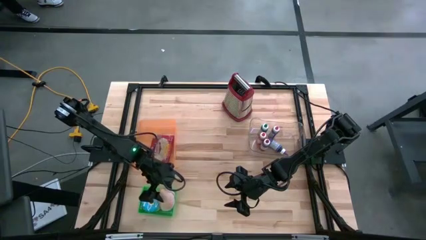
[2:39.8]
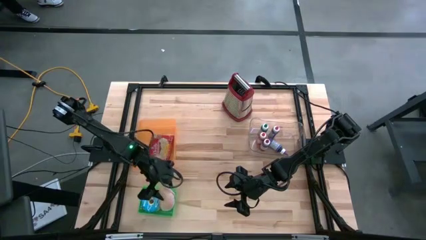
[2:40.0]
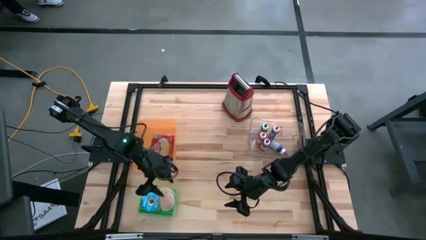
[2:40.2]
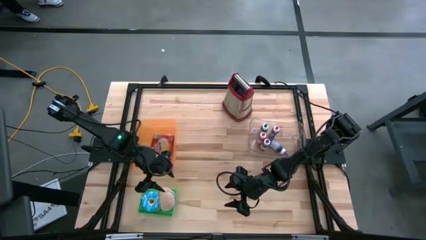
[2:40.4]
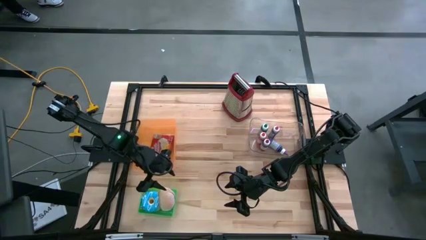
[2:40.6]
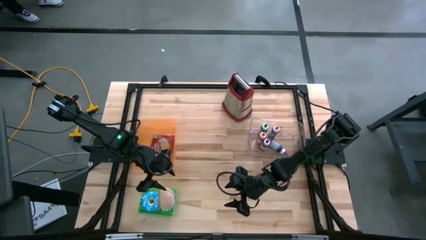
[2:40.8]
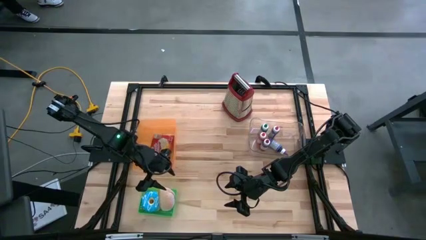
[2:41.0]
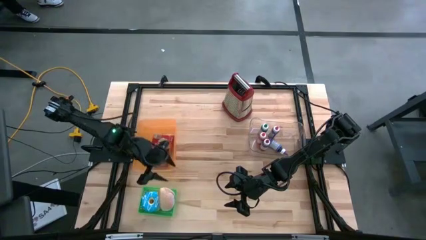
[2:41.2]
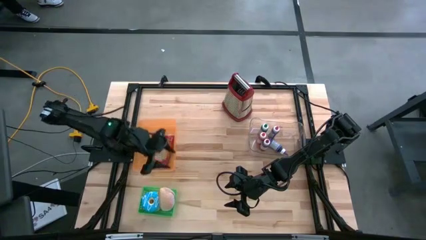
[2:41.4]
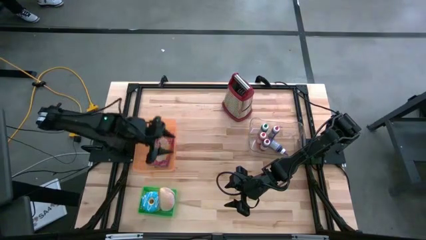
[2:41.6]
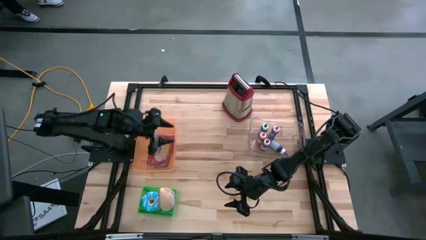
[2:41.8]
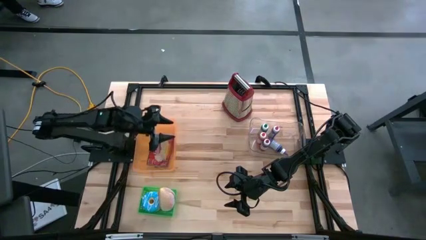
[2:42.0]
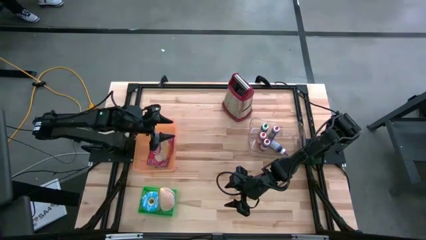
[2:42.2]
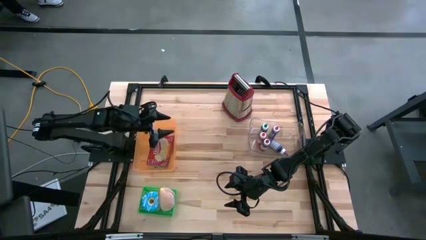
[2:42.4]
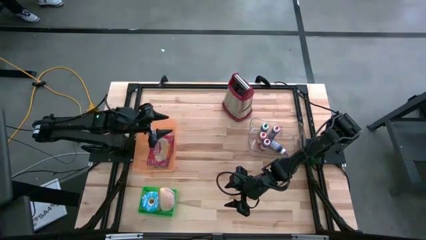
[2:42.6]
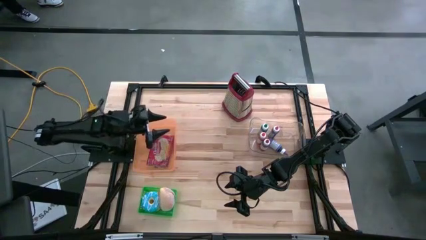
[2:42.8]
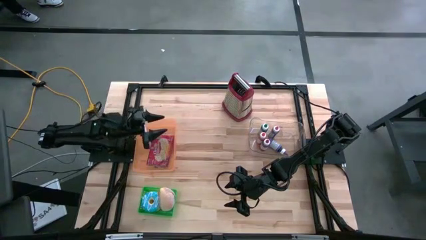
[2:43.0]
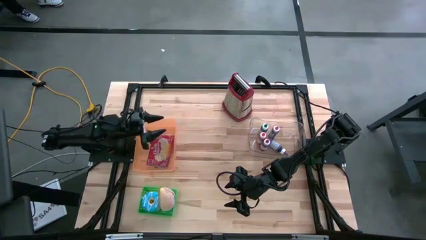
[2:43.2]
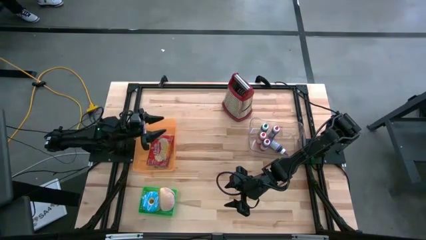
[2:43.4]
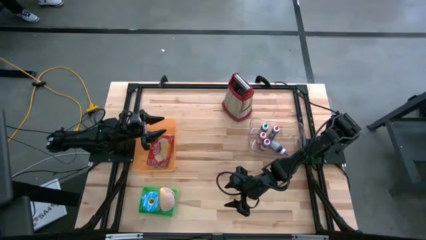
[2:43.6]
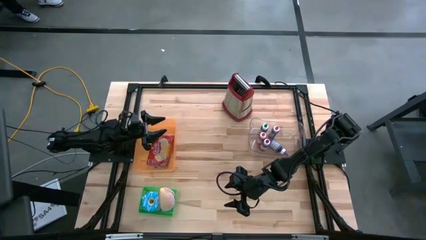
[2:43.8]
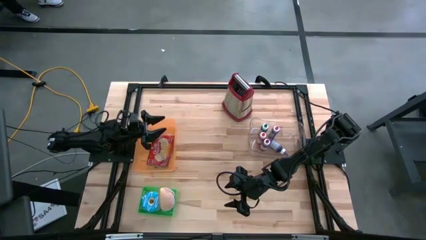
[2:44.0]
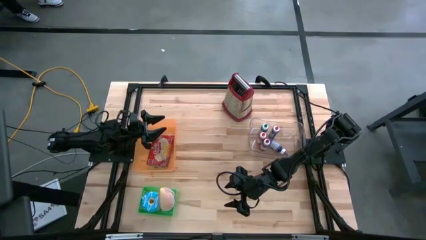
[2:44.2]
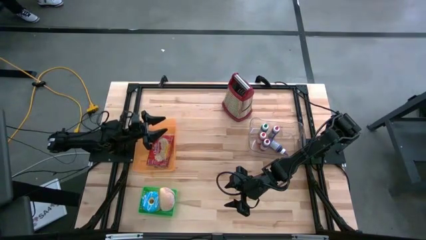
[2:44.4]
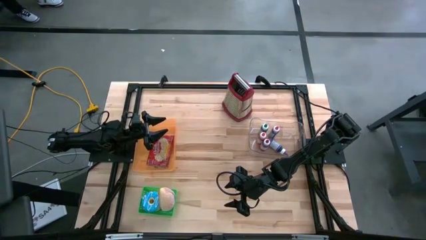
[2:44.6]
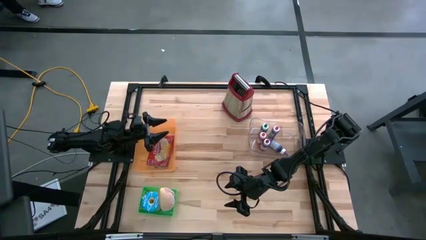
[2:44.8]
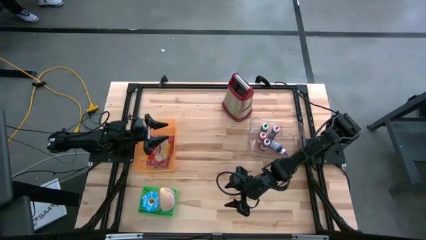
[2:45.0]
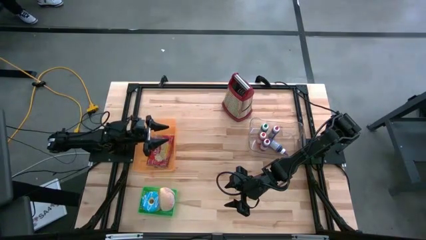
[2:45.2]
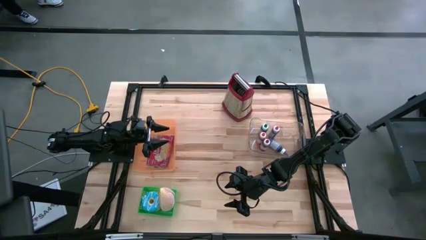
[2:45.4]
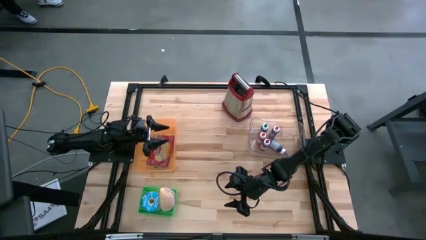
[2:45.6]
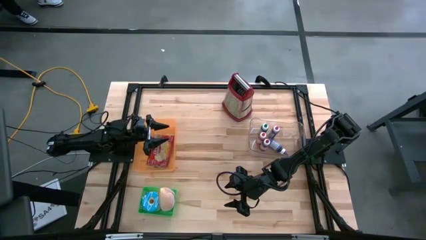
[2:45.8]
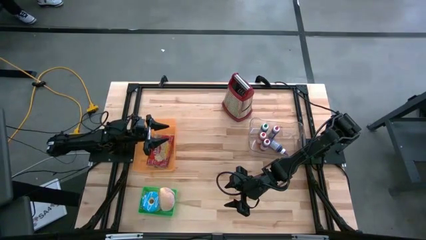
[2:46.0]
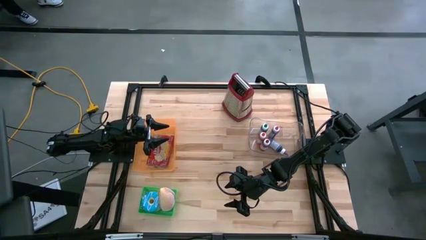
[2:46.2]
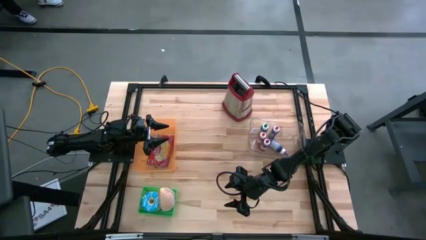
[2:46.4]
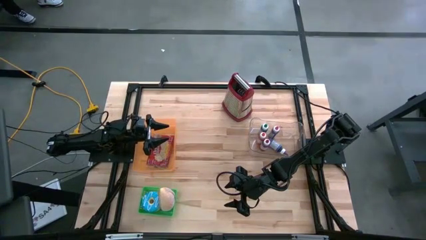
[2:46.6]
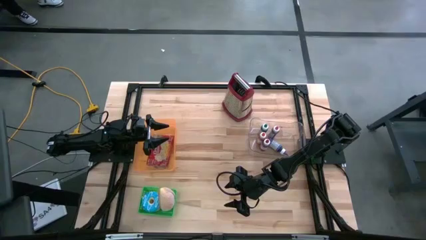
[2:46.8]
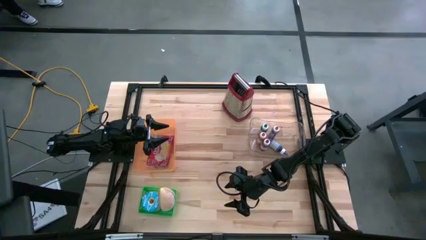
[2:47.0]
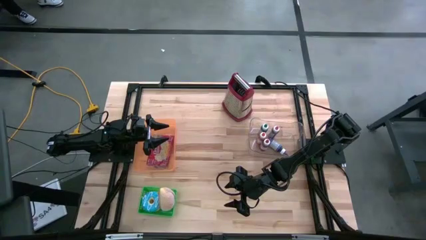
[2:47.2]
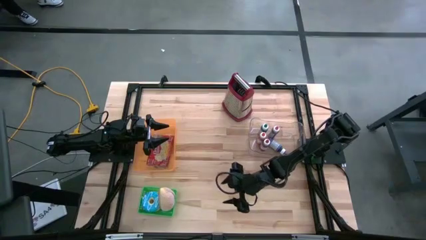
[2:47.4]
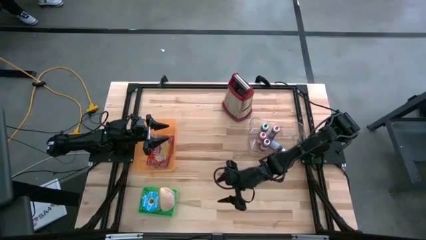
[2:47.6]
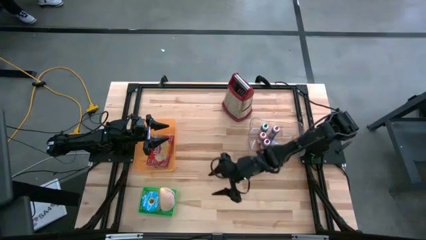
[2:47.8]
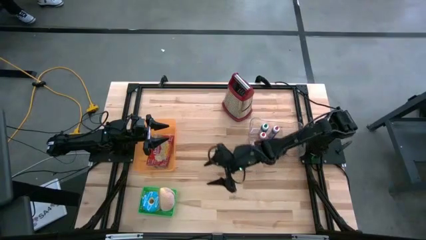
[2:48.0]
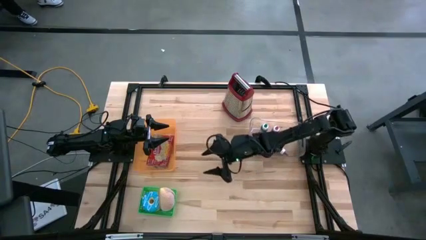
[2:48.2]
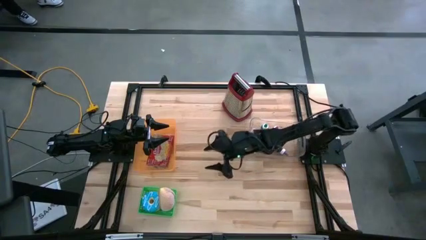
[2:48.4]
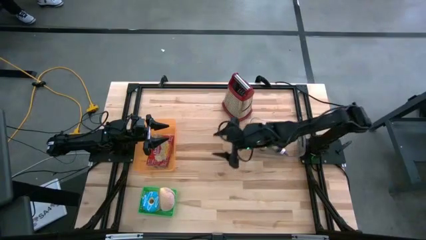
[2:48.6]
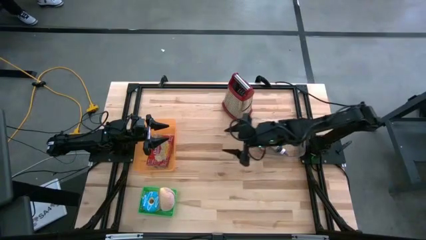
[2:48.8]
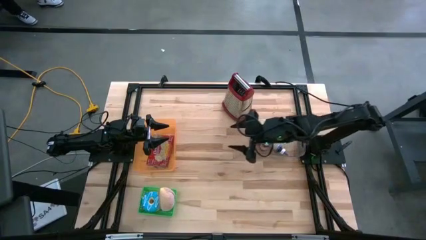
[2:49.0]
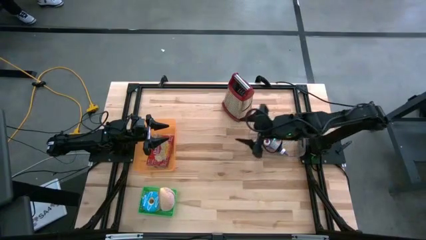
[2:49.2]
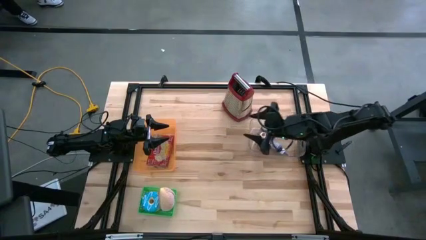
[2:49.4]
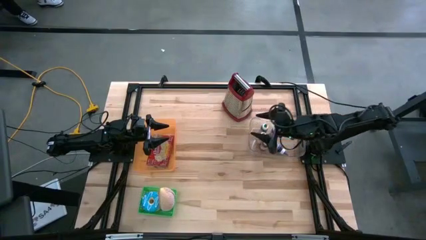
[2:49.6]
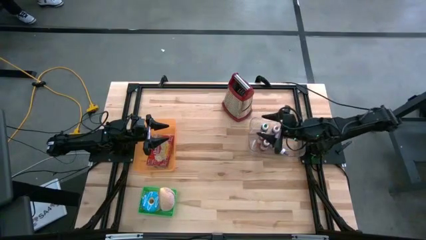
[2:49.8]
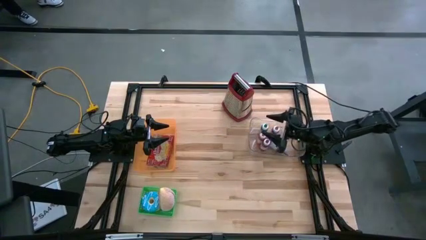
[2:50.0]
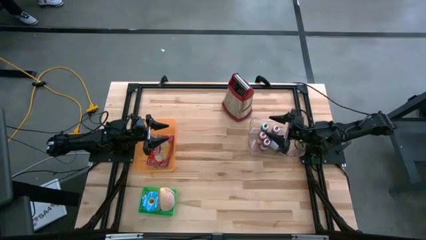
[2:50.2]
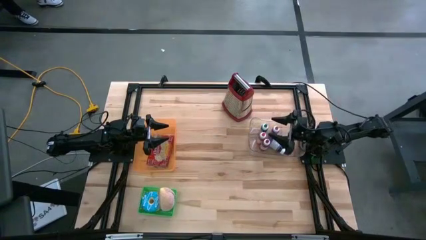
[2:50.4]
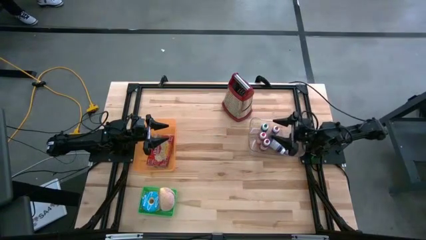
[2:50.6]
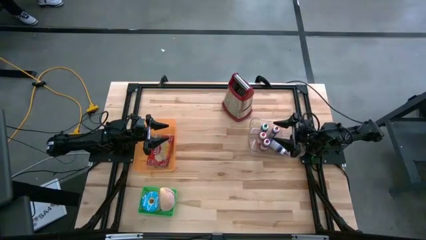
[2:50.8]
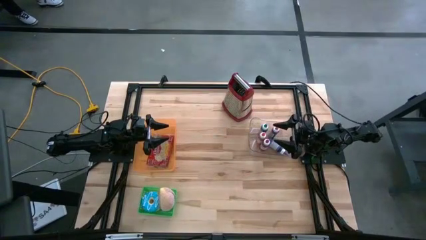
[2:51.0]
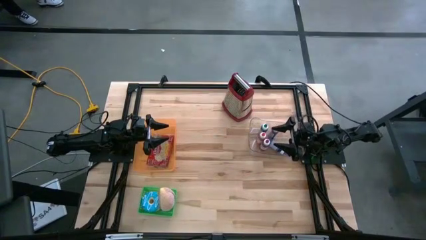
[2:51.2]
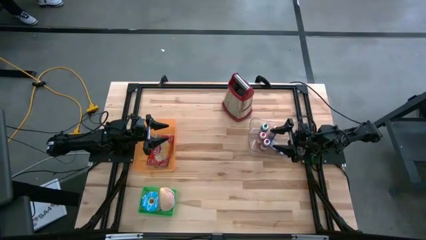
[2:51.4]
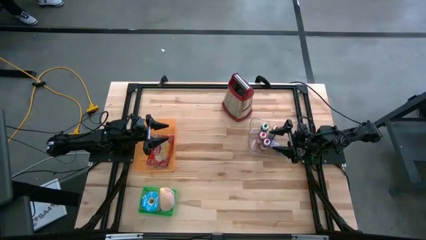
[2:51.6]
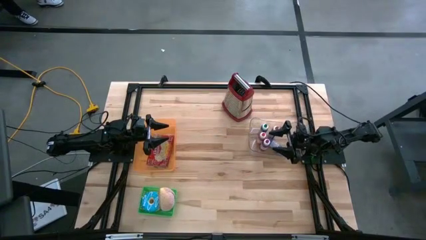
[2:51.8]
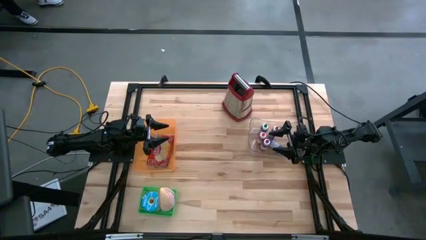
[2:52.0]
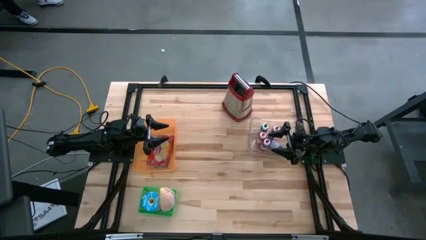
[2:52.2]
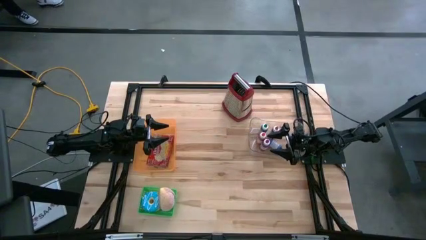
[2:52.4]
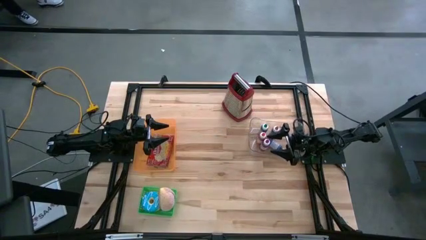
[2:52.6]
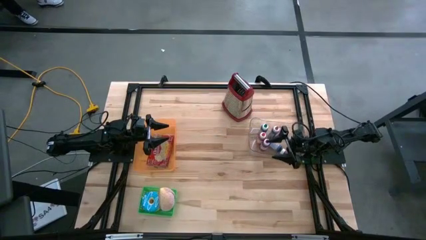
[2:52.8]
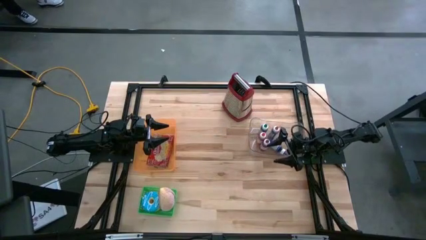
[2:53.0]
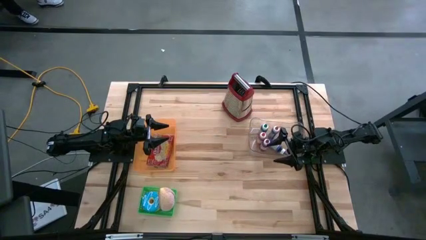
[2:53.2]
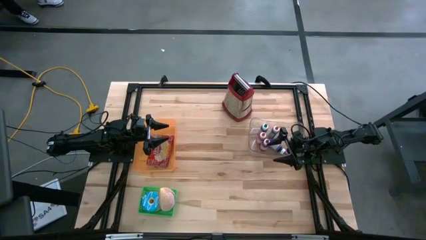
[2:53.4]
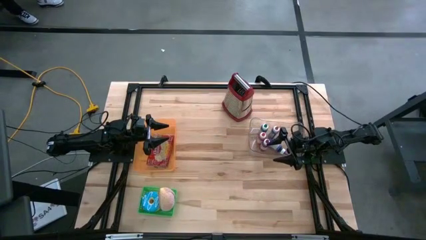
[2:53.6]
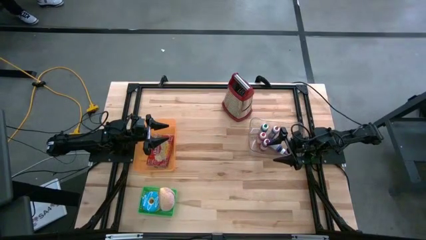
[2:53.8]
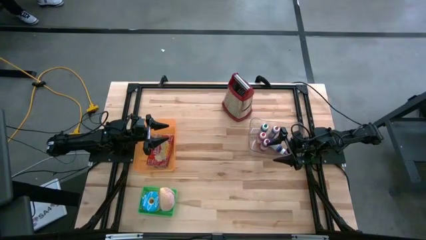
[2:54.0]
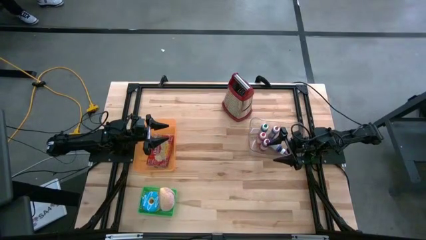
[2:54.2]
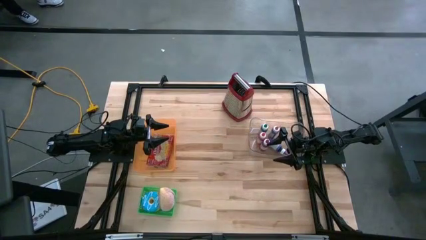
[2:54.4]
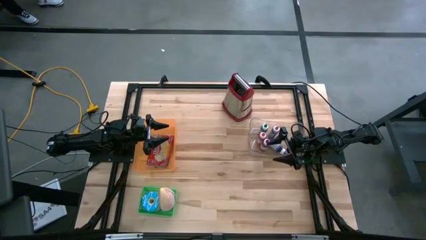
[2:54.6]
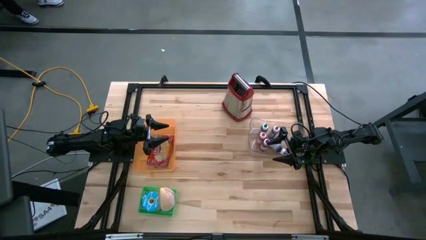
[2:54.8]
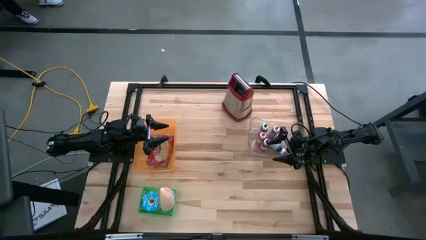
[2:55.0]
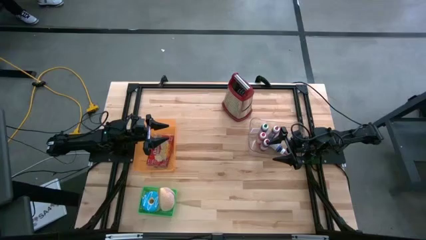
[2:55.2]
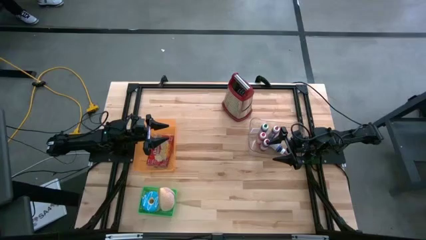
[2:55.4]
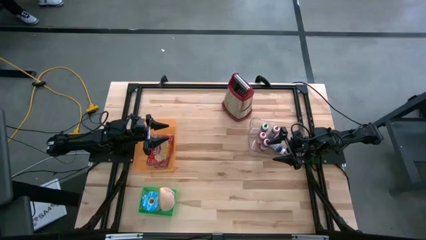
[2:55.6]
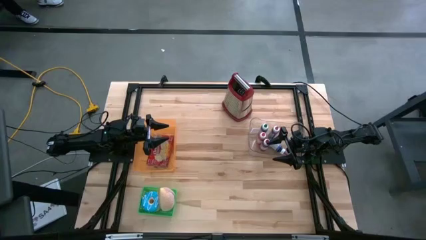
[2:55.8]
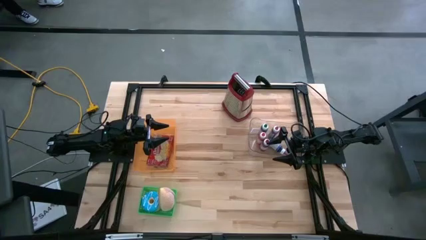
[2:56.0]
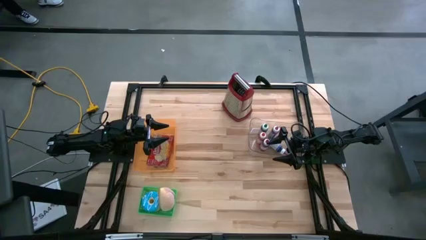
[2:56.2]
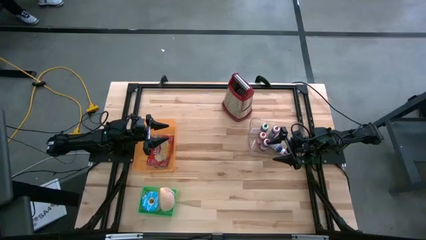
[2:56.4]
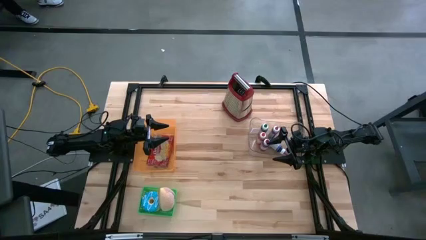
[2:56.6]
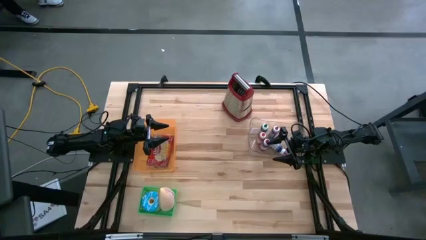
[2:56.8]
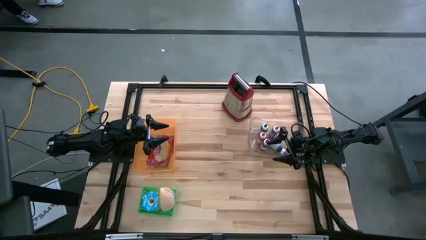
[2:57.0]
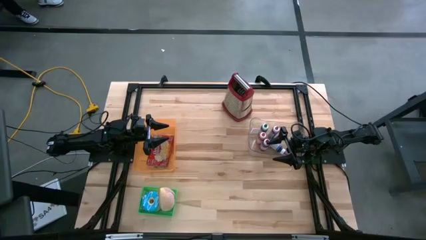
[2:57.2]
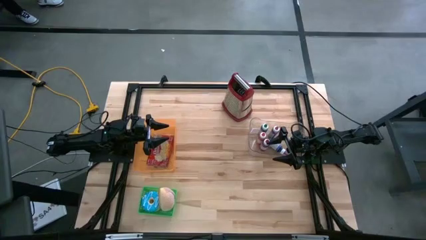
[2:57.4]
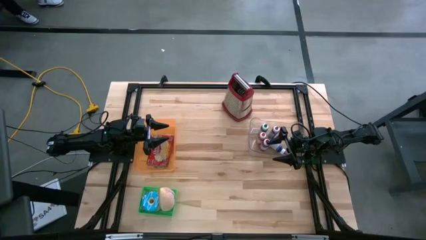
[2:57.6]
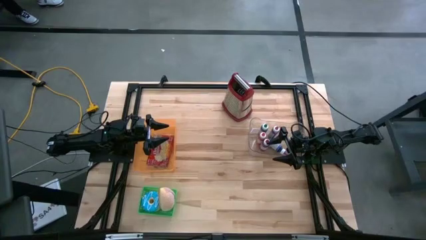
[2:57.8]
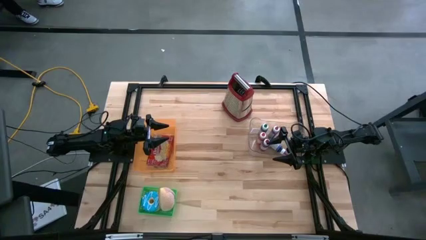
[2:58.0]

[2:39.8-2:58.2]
Return to Home Position
